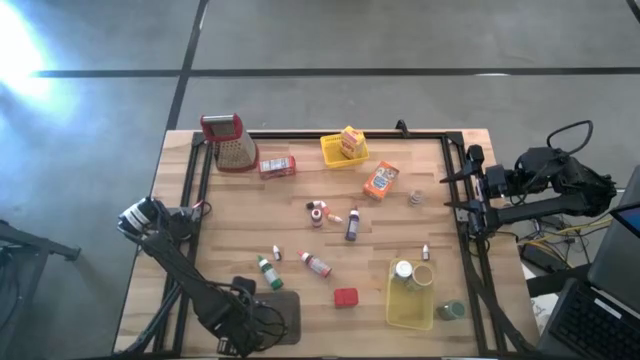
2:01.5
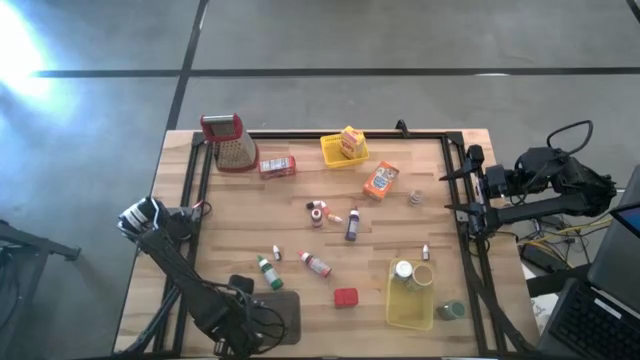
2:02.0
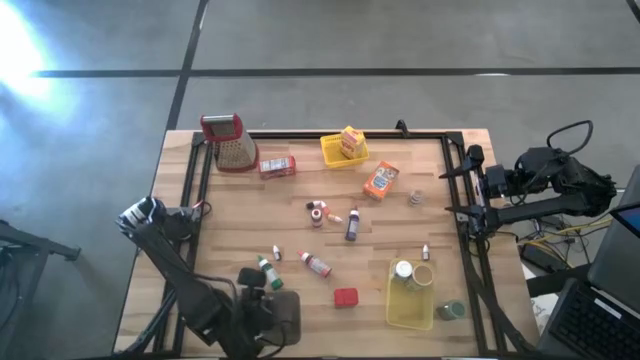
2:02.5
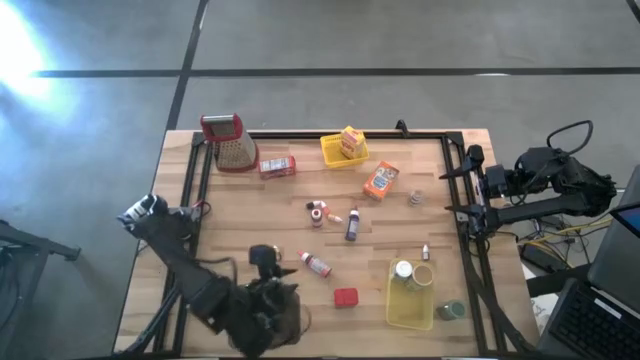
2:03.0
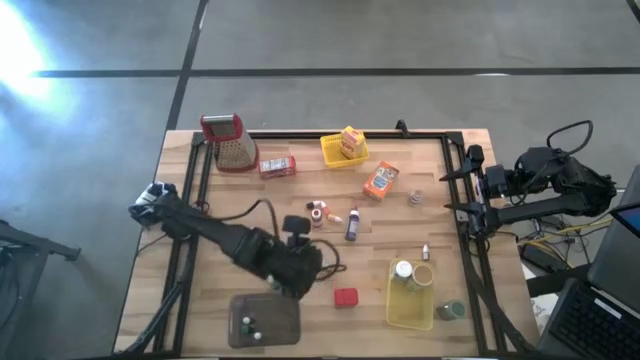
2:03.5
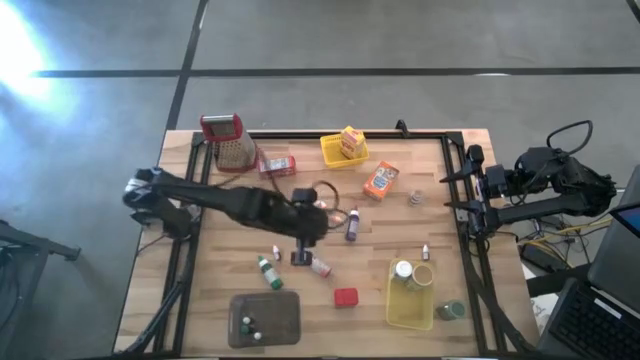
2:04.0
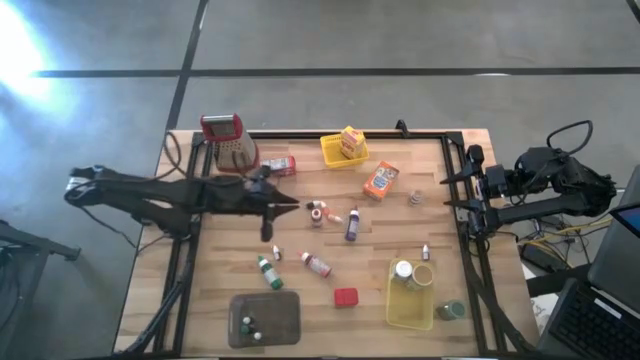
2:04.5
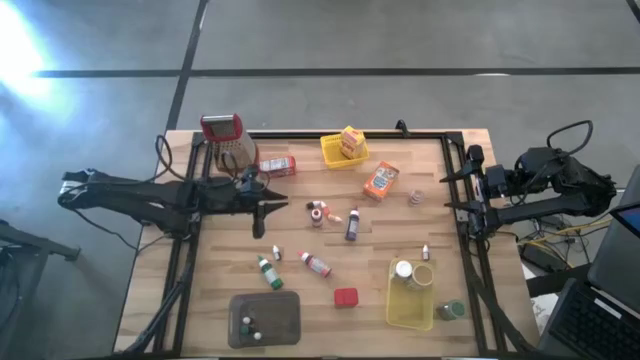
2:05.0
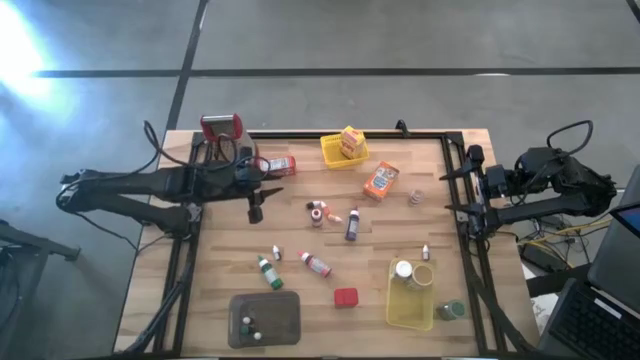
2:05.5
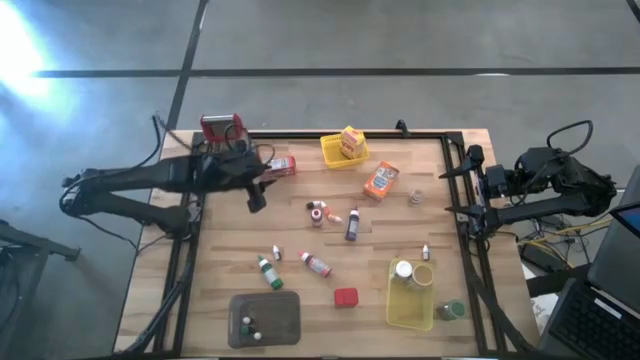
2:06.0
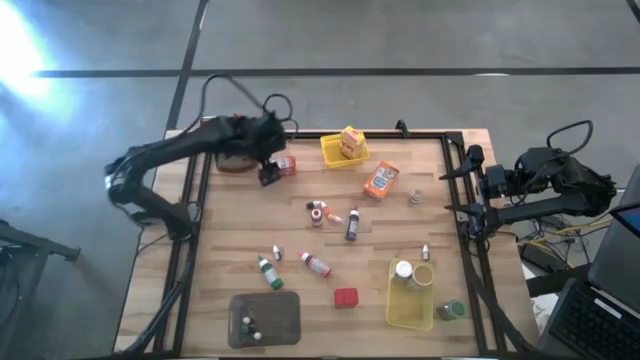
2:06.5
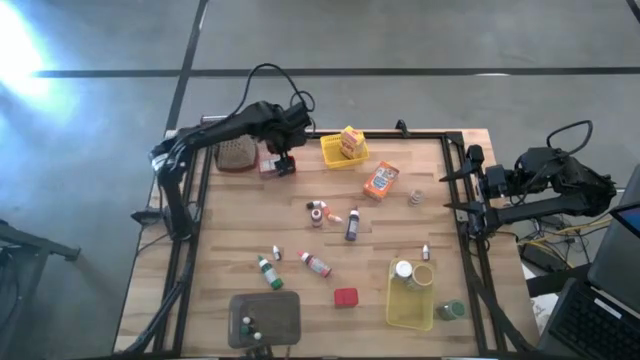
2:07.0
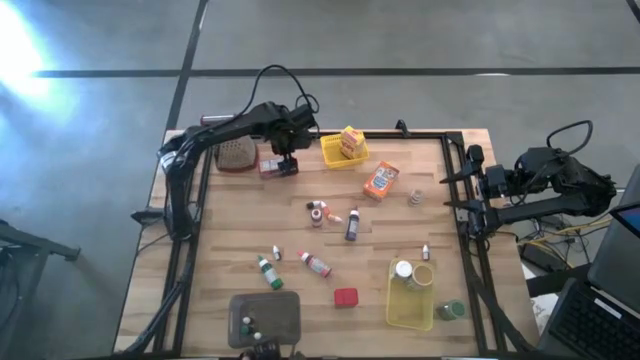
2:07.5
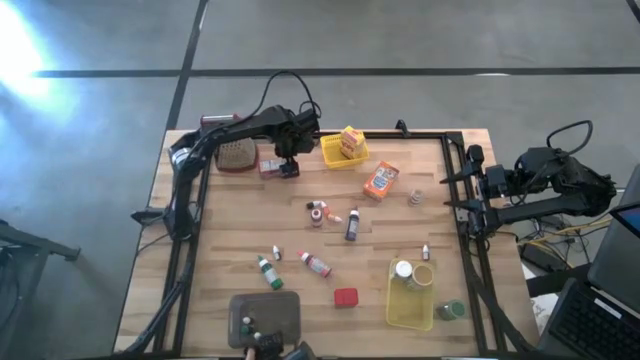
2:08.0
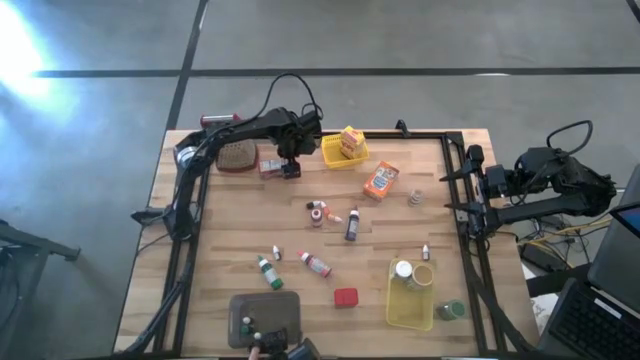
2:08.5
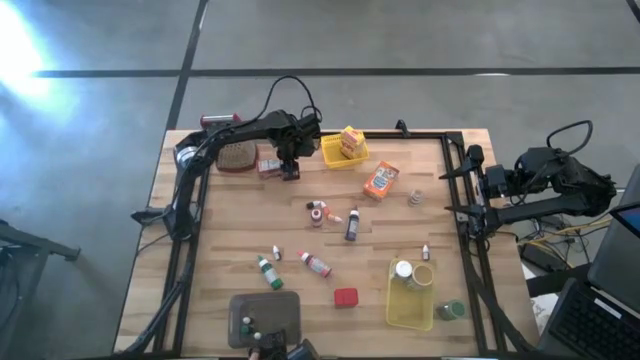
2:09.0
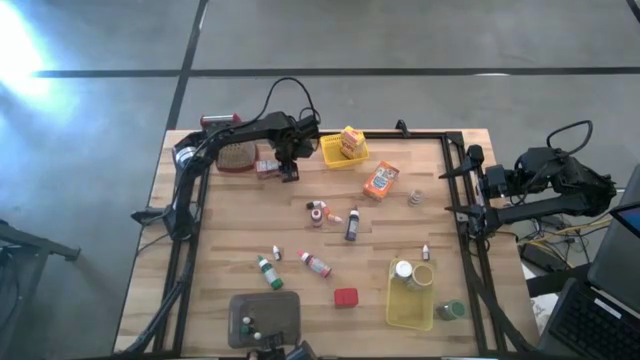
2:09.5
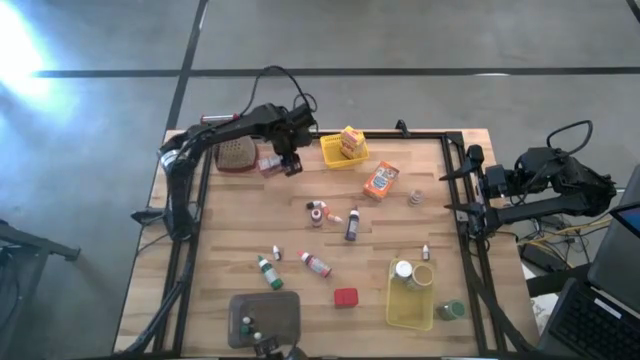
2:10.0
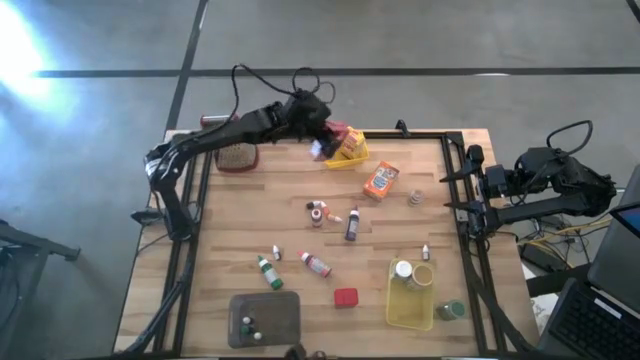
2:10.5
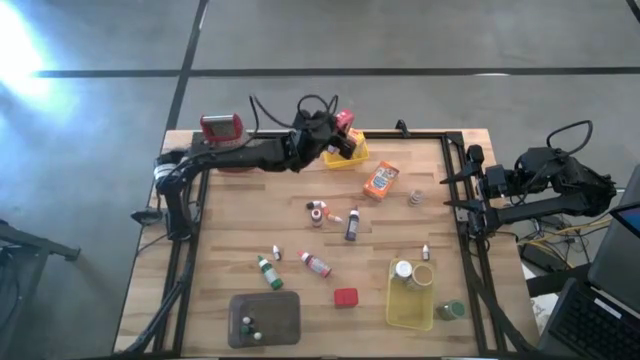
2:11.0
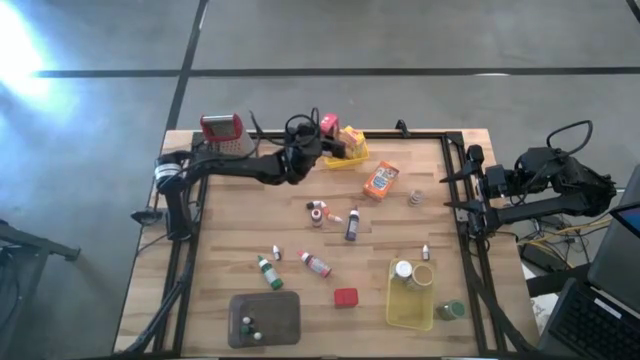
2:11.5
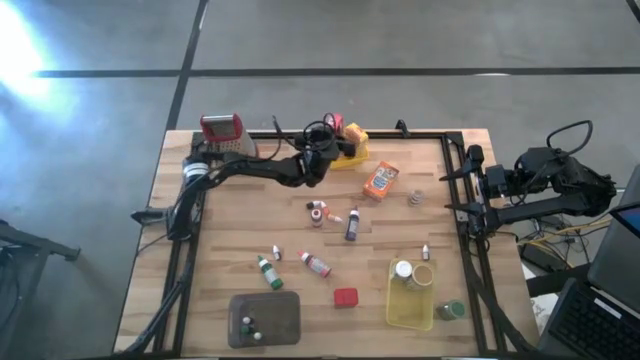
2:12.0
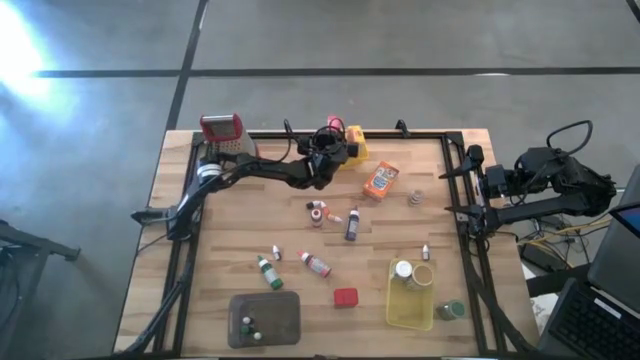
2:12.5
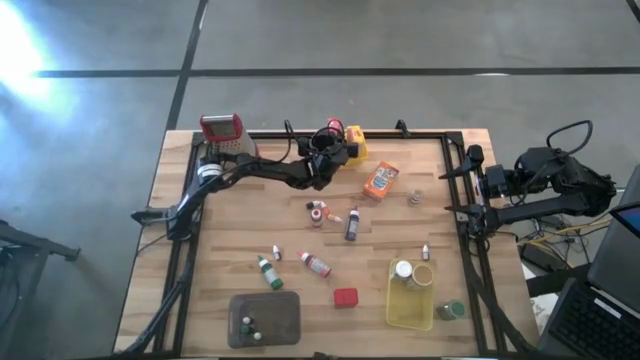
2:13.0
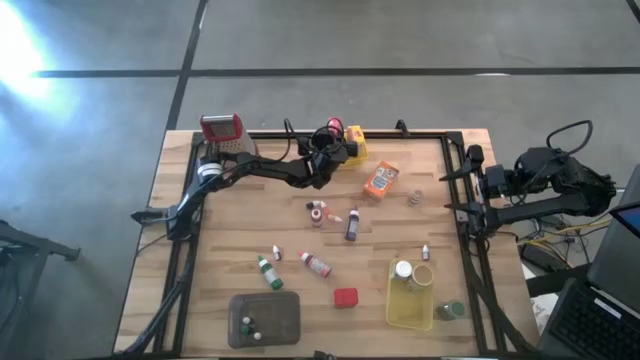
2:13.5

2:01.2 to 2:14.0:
Task: Pick & Place Kitchen Items
Put the red cereal box into the top yellow bin

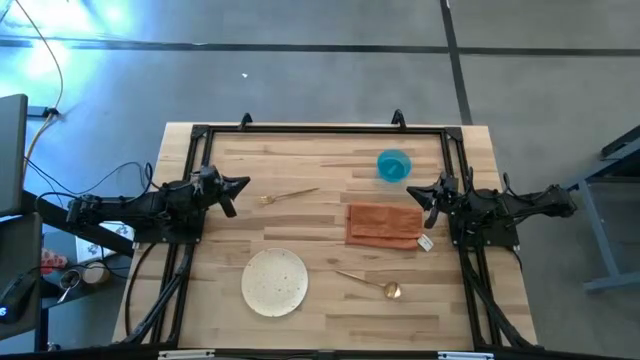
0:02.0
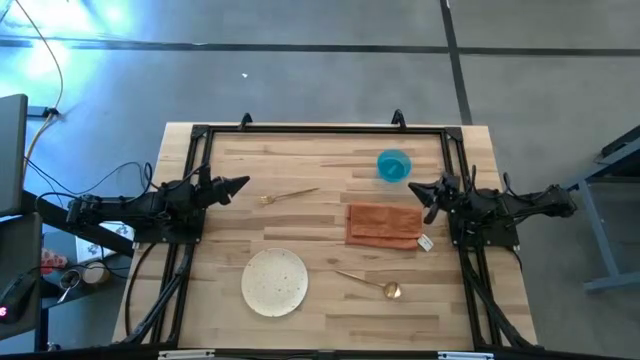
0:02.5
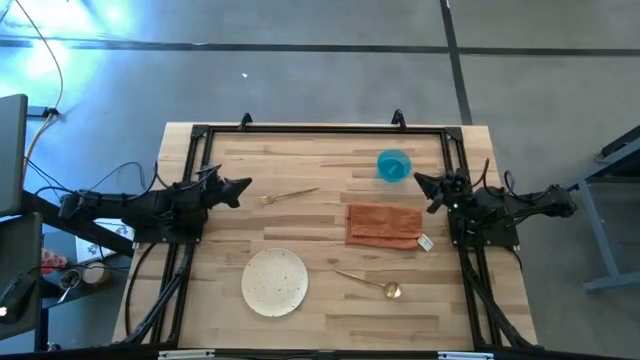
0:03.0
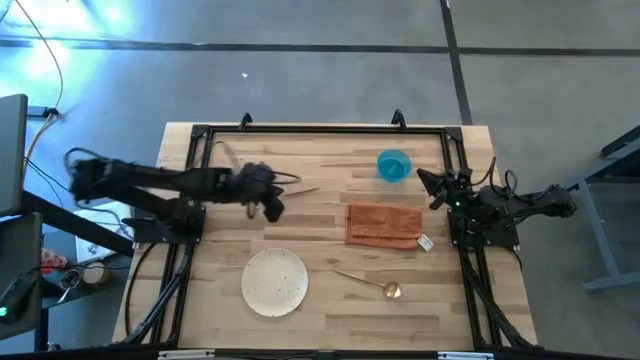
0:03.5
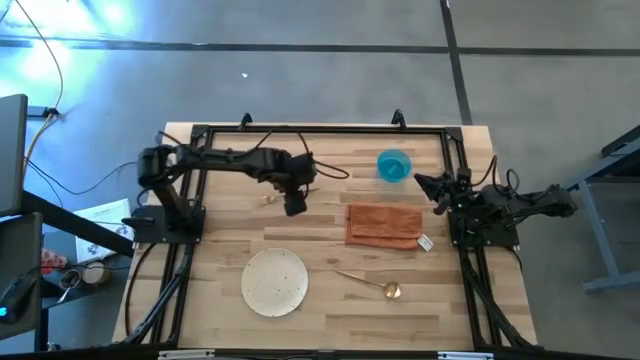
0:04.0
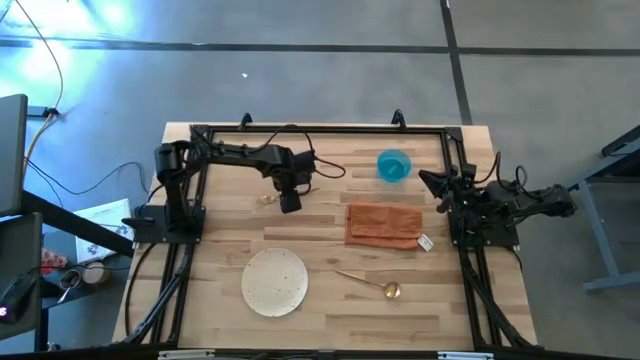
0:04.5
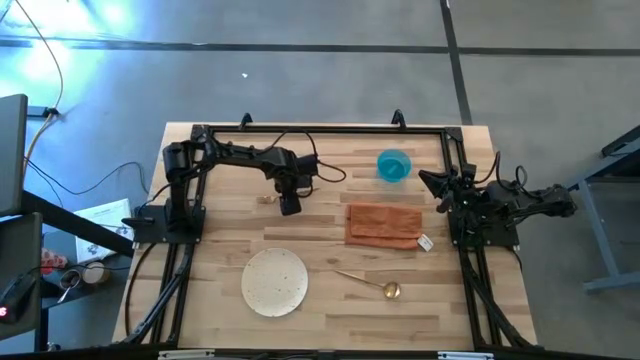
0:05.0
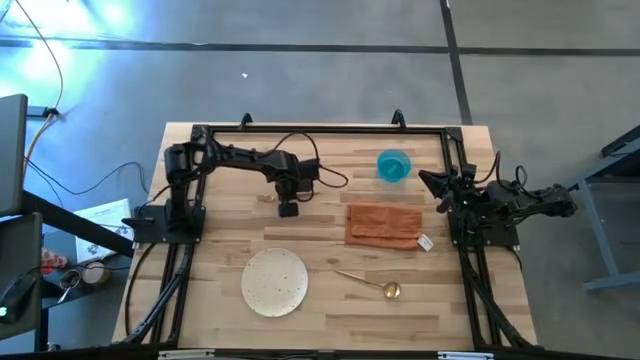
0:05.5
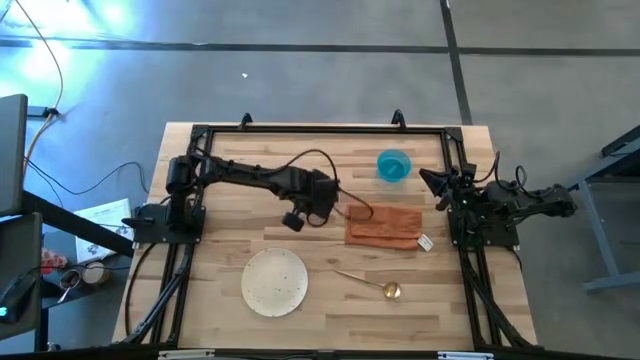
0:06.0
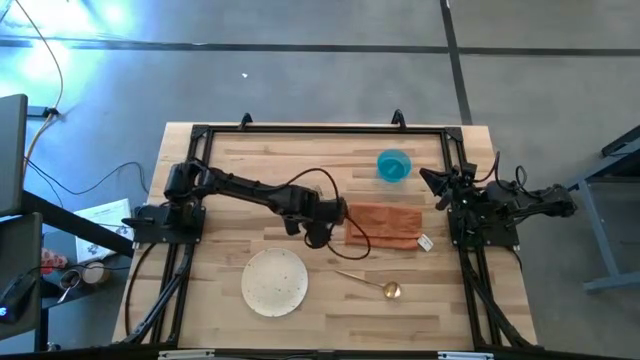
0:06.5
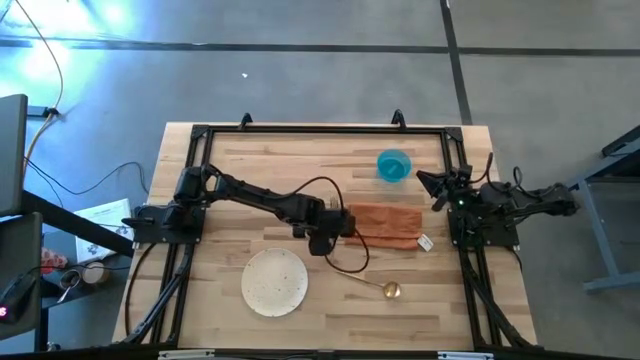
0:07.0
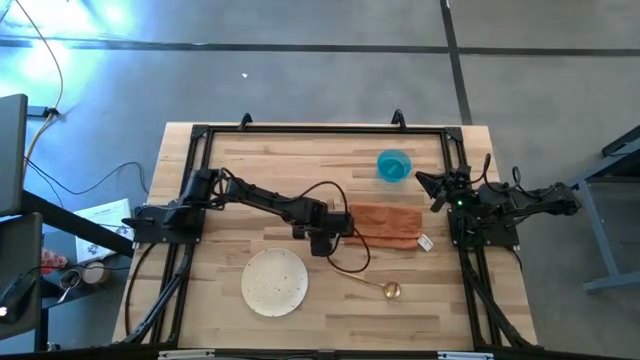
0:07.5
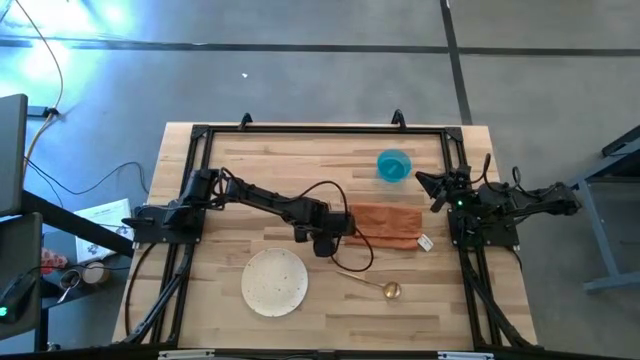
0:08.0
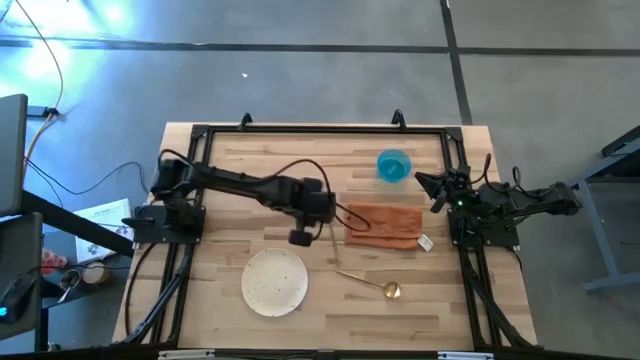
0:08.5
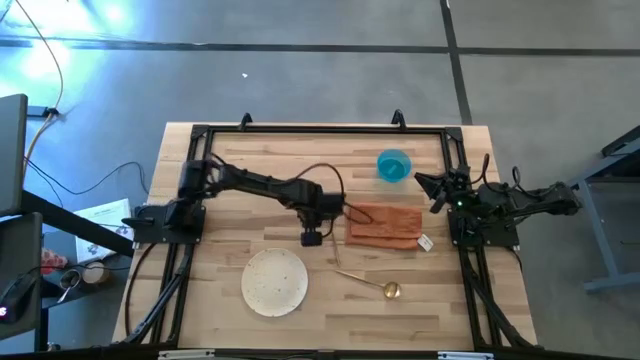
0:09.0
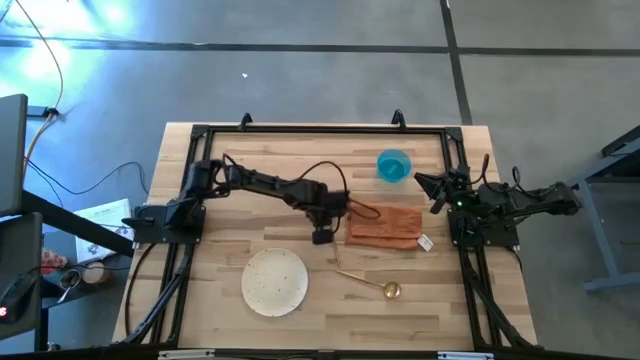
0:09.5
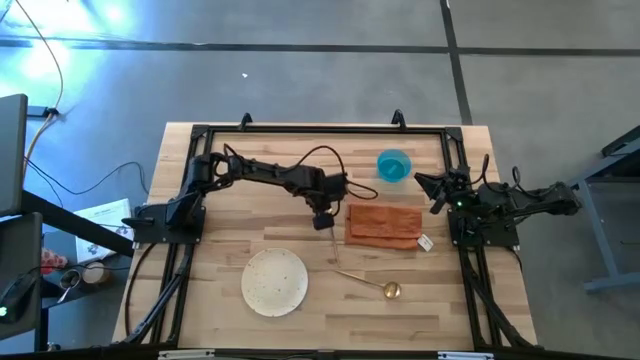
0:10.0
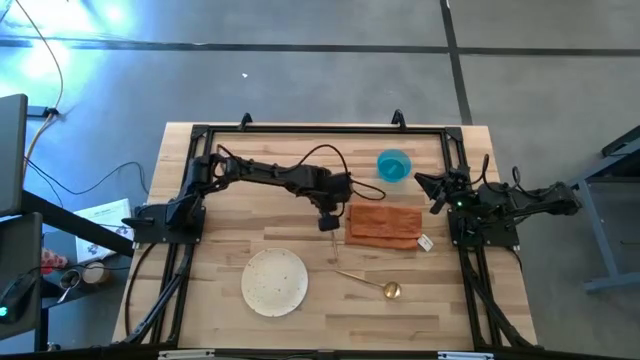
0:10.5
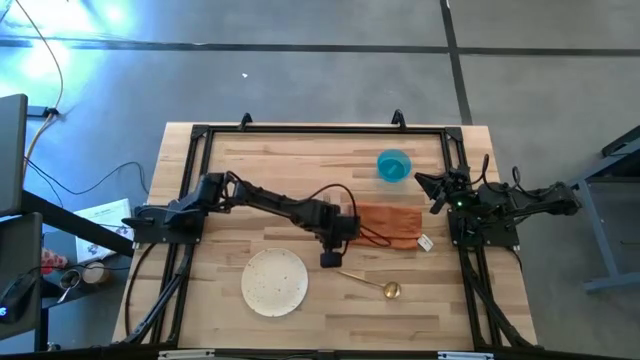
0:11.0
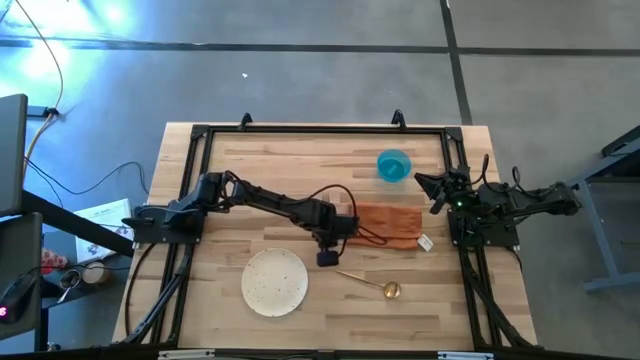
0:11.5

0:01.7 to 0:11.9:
Task: Set table place
Move the gold fork to the left of the orange table napkin
